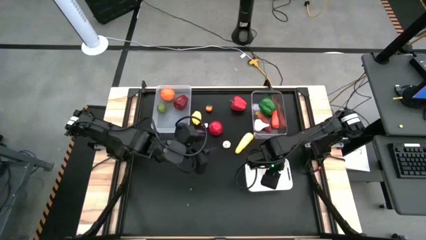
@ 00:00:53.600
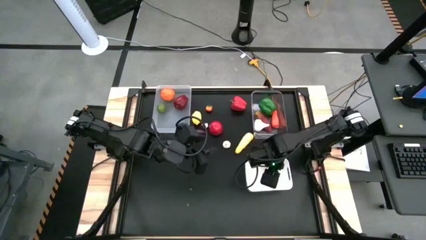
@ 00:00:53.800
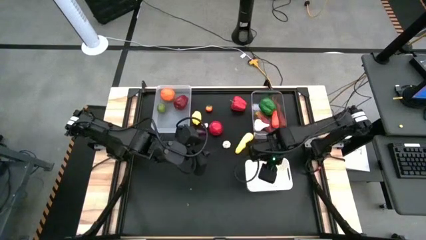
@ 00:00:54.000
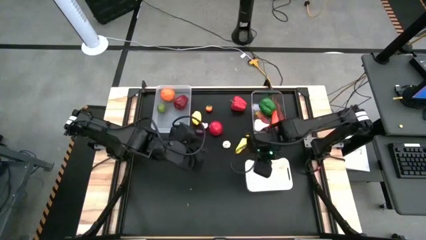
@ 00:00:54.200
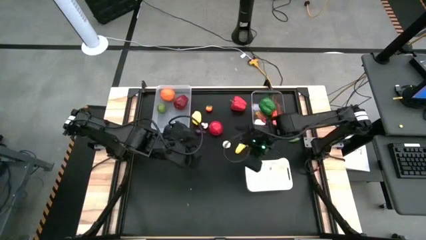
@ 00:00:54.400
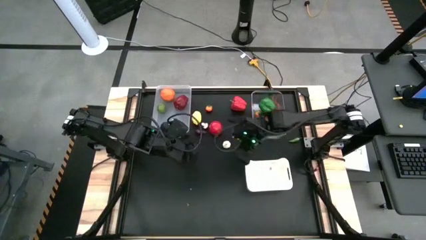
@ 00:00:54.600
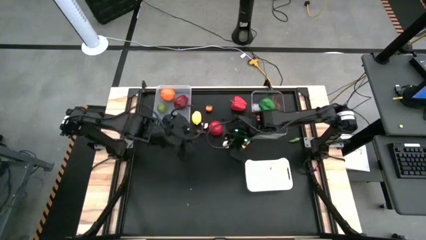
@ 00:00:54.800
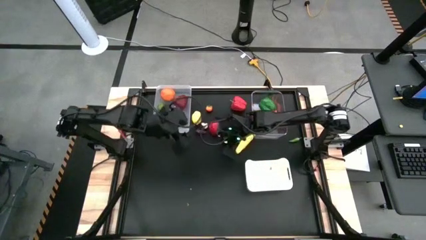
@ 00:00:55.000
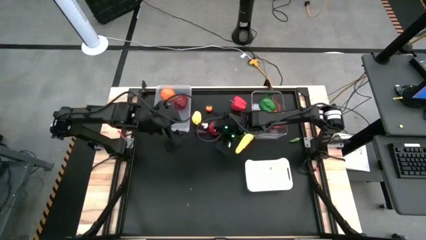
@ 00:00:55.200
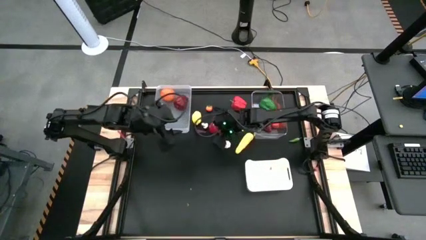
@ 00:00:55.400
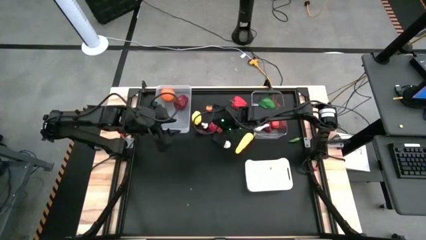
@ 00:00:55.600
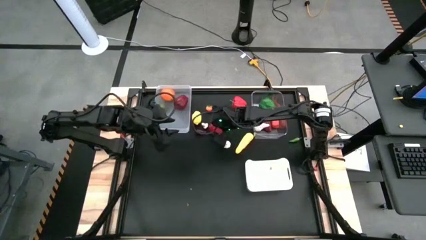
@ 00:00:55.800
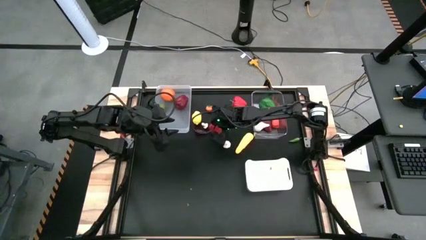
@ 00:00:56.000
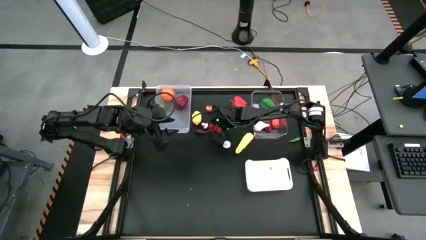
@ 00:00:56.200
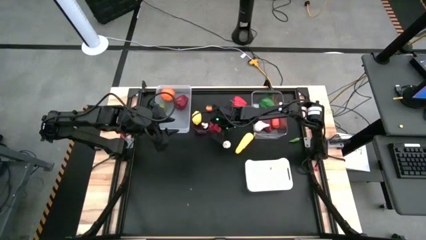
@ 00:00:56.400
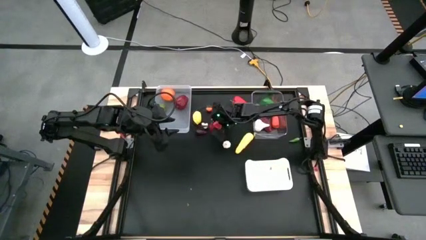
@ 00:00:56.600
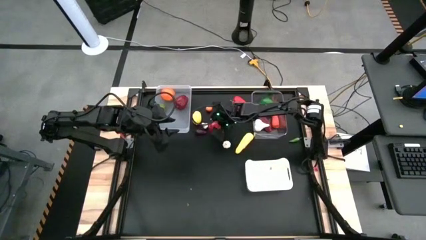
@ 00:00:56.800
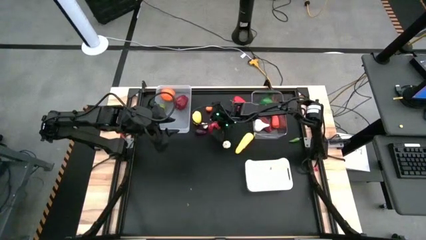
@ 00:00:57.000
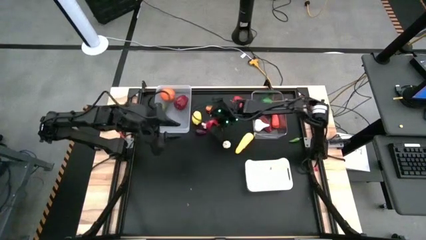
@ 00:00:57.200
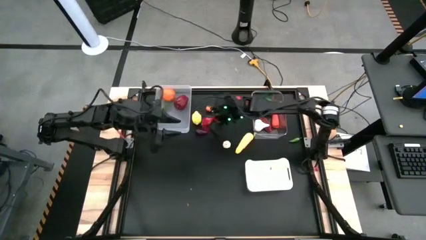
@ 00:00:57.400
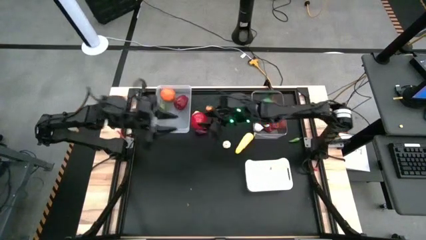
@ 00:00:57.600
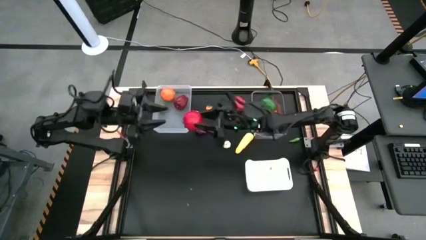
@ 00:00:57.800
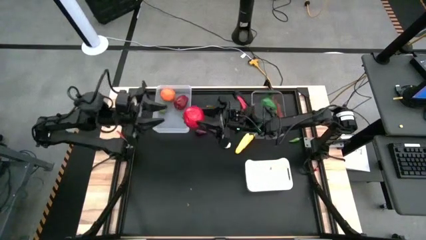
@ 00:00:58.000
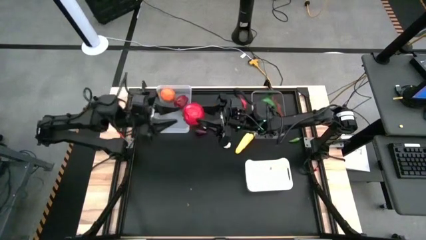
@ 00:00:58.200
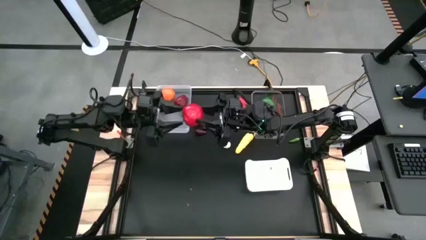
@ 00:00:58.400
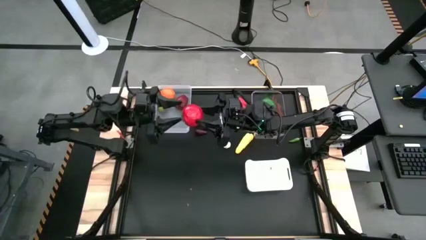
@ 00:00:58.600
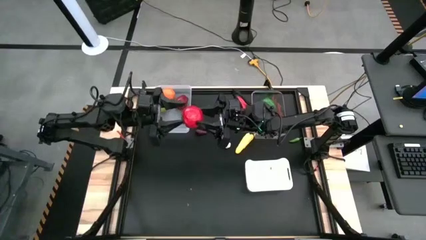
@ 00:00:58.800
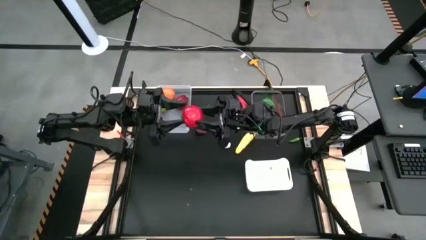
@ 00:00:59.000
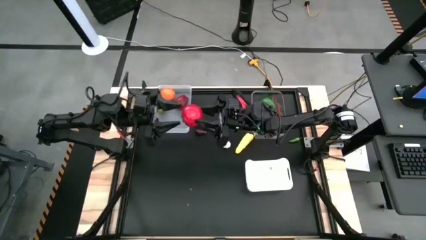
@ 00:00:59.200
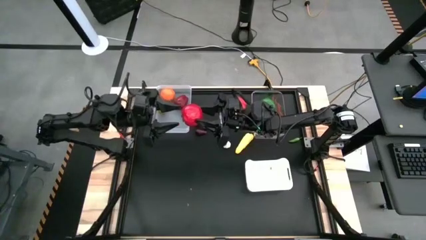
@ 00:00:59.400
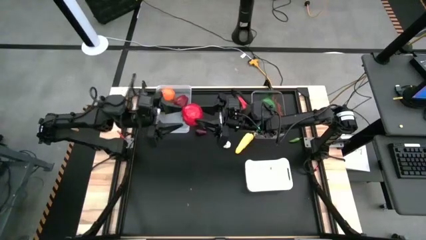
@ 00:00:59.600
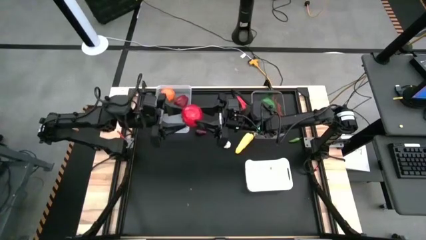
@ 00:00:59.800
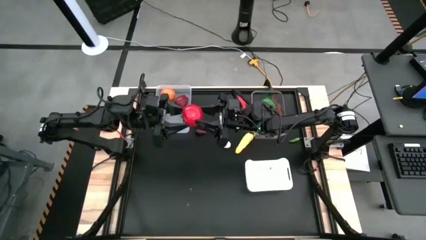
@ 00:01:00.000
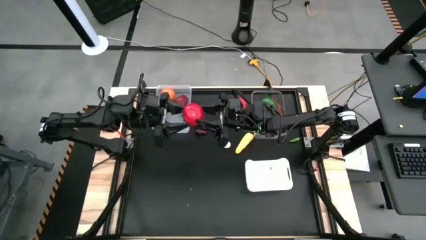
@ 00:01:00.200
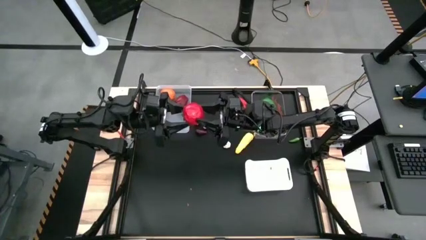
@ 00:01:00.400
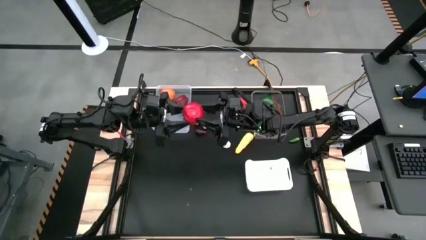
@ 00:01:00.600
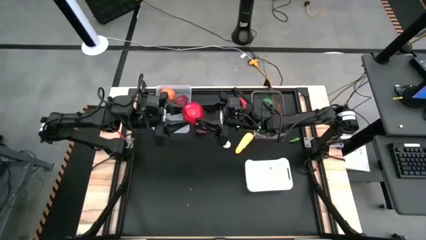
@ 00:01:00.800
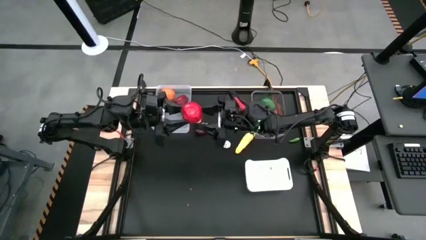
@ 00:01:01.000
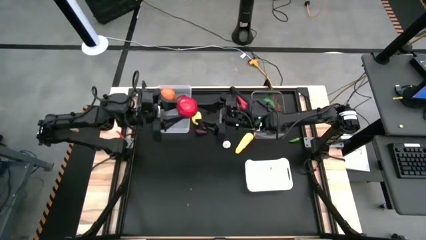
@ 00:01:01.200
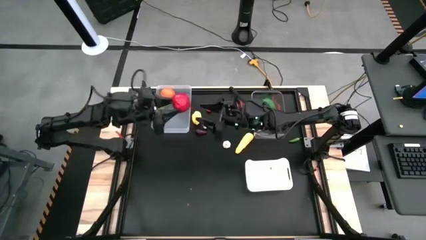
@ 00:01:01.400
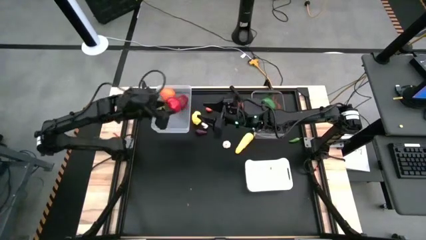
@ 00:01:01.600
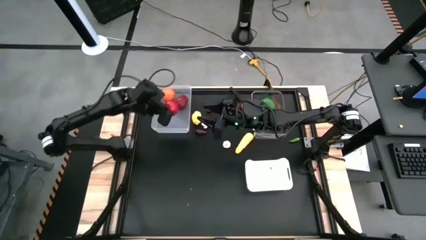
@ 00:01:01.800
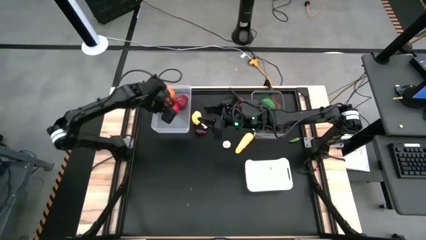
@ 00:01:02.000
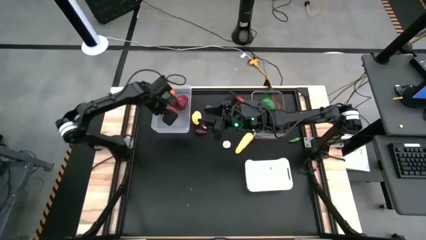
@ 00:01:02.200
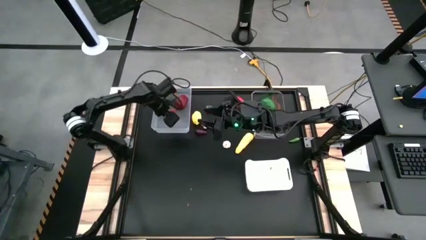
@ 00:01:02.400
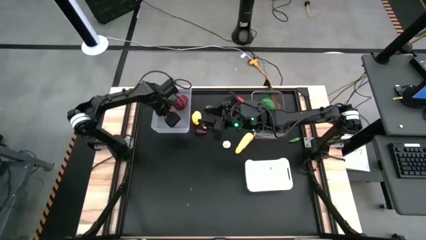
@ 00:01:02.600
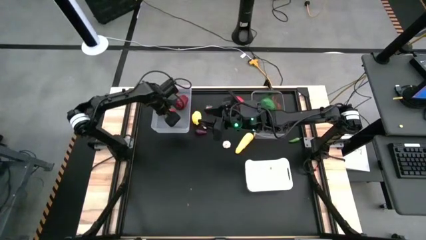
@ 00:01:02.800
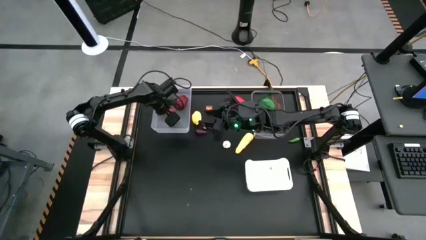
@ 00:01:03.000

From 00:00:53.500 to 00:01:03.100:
Task: Sort produce into baskets
Put the red tomato into the light white bin

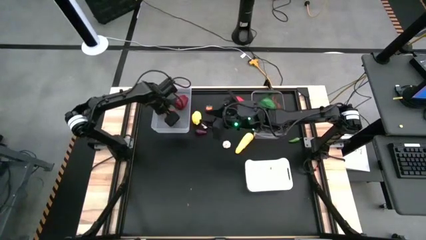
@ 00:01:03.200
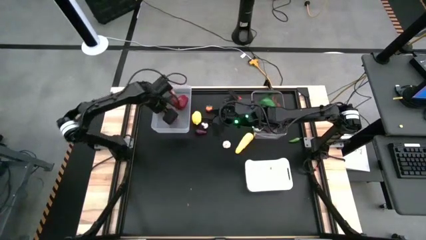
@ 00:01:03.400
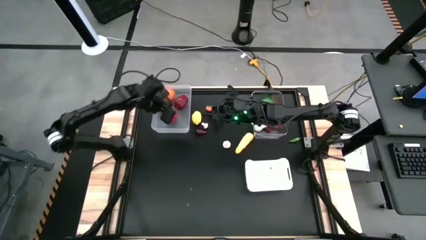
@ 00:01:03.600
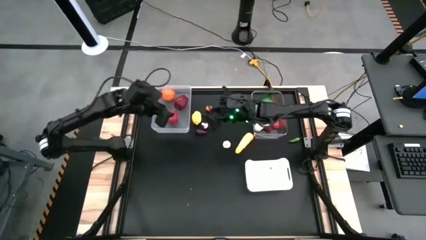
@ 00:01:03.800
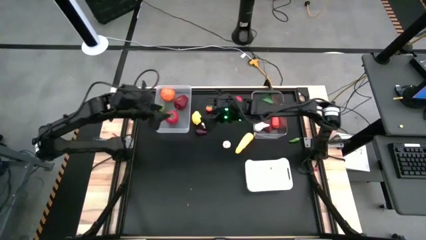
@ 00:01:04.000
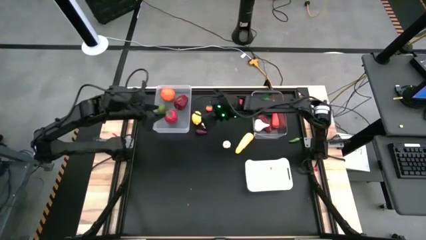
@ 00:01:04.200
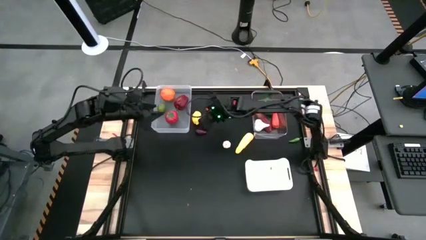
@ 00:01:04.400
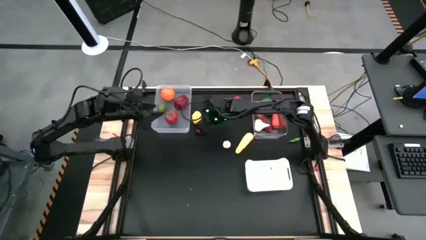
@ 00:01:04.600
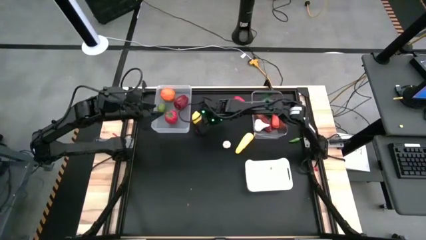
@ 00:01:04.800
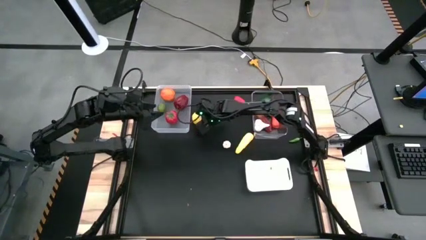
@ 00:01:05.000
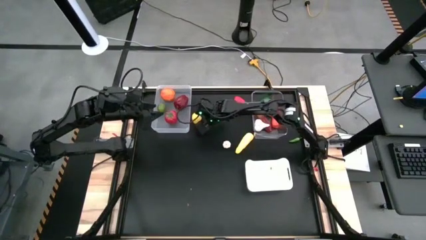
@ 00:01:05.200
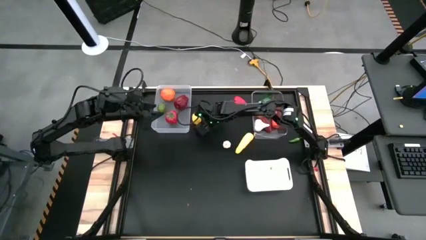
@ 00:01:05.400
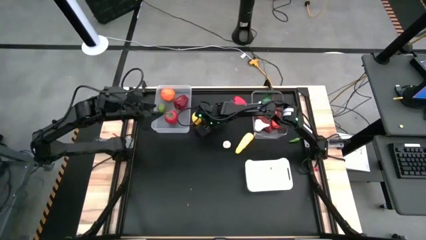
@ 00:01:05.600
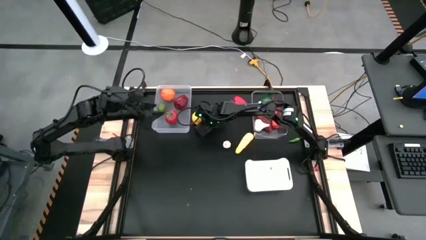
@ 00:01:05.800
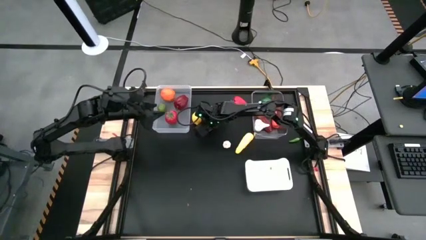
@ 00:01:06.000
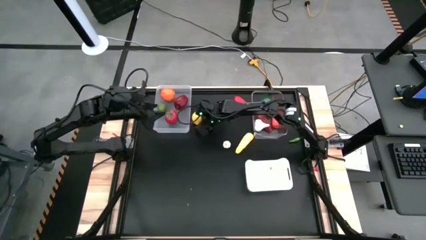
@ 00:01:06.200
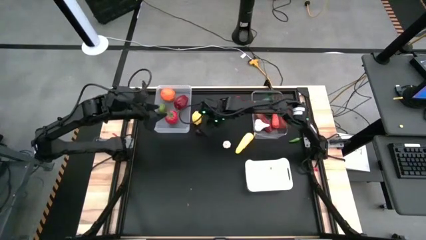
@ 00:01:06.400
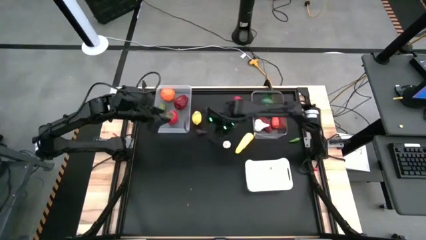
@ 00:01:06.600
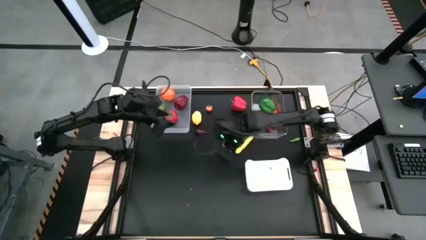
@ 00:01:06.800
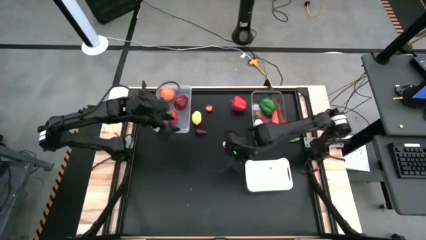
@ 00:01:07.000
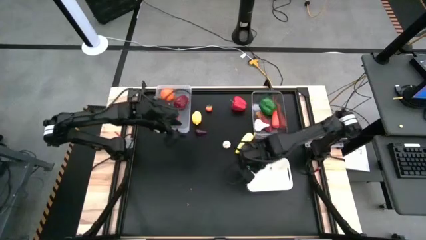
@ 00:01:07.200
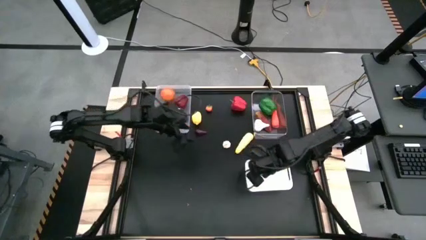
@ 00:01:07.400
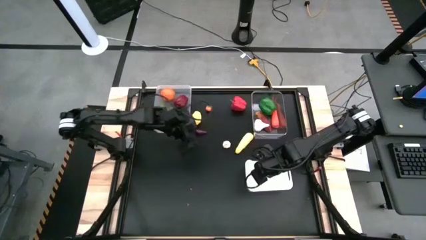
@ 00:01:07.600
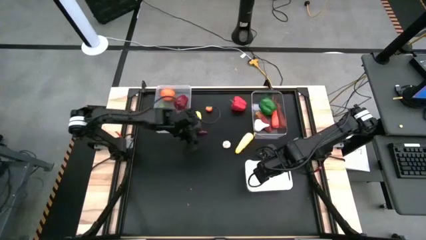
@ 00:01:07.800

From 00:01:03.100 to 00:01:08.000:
Put the white mushroom into the white bin

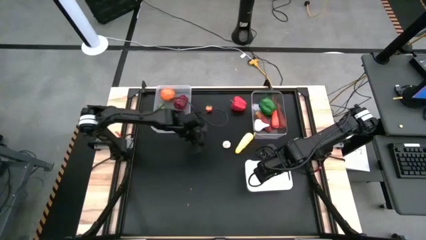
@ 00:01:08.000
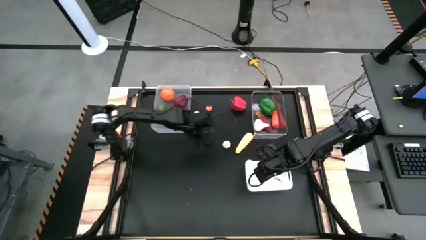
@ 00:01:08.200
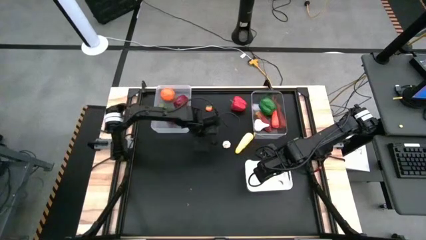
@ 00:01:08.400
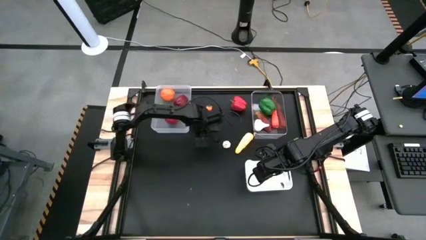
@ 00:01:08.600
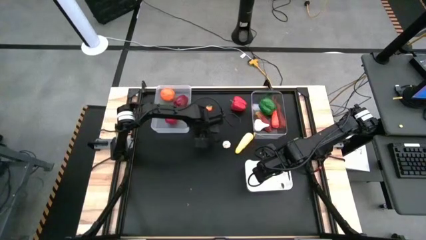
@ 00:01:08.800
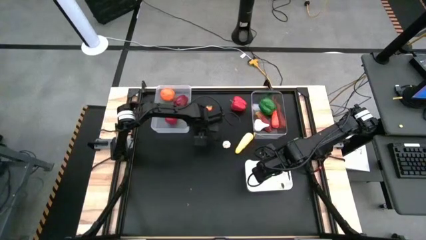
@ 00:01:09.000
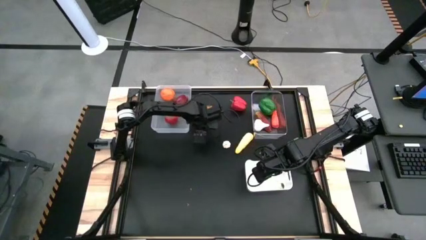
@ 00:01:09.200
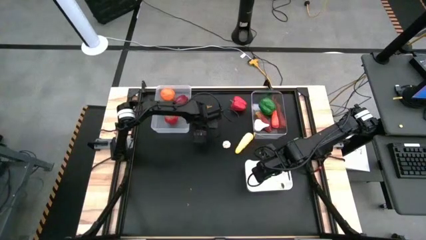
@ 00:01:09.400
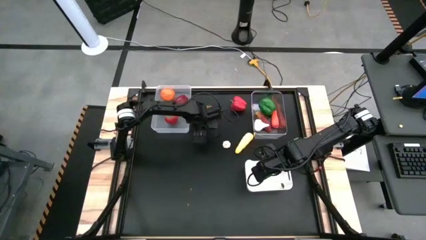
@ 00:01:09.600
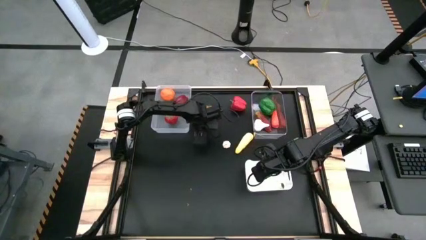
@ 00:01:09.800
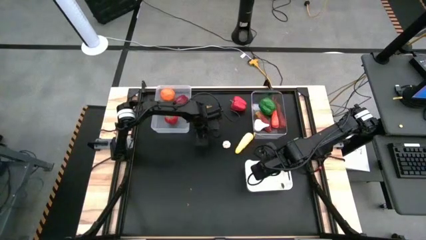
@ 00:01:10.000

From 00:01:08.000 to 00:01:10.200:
Put the purple eggplant into the white bin
